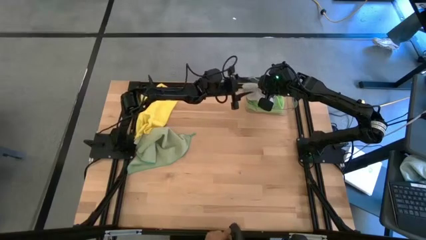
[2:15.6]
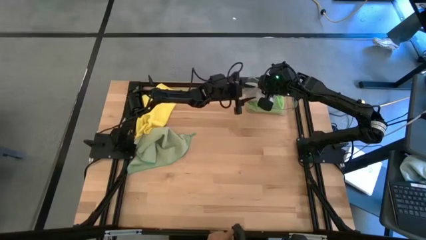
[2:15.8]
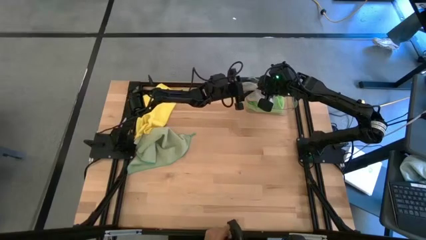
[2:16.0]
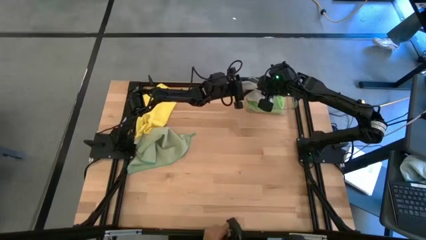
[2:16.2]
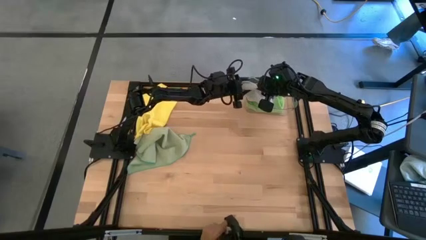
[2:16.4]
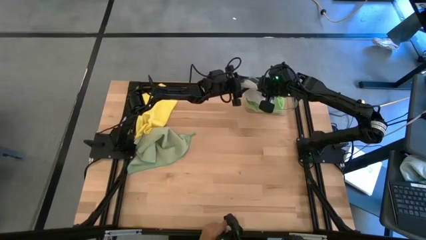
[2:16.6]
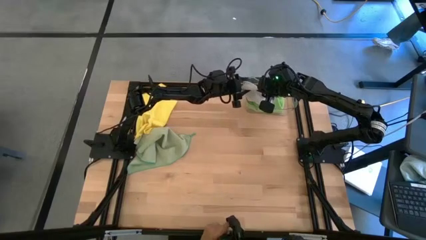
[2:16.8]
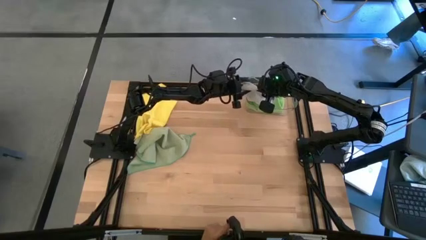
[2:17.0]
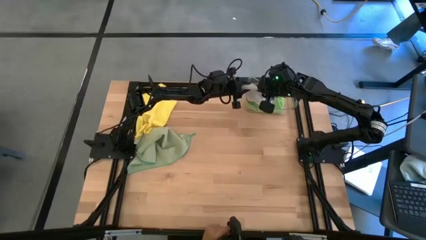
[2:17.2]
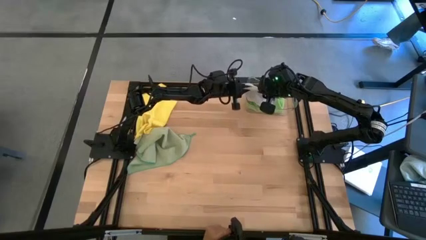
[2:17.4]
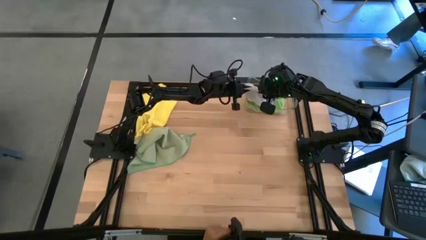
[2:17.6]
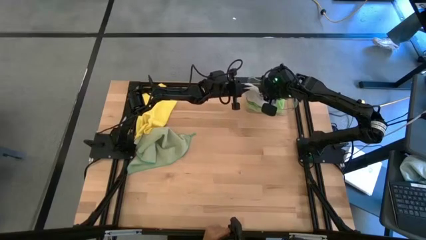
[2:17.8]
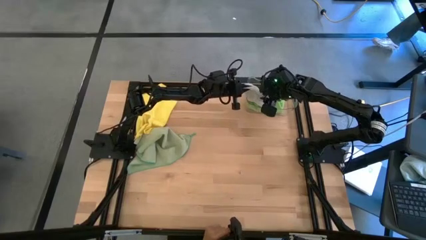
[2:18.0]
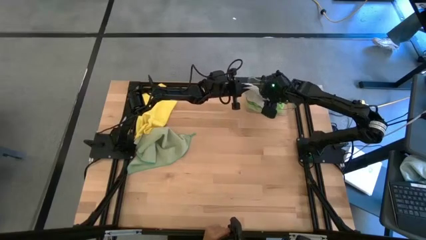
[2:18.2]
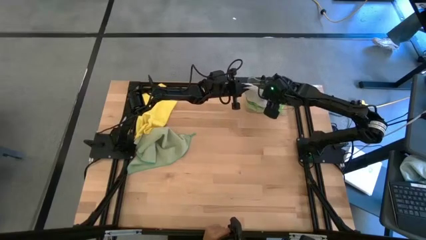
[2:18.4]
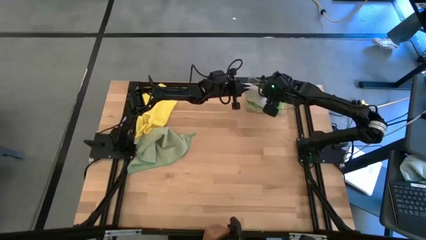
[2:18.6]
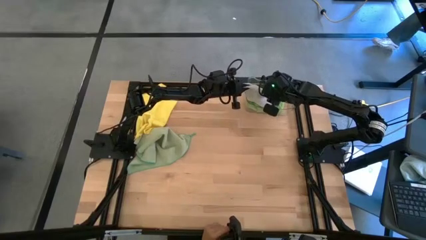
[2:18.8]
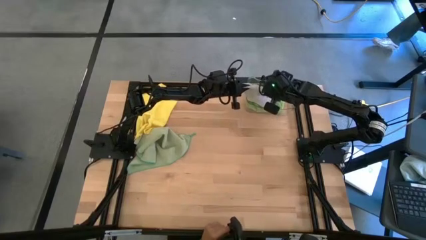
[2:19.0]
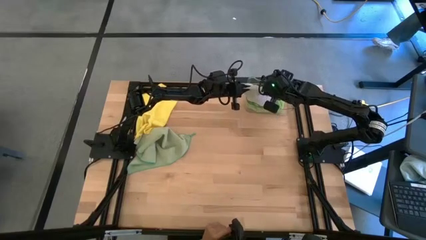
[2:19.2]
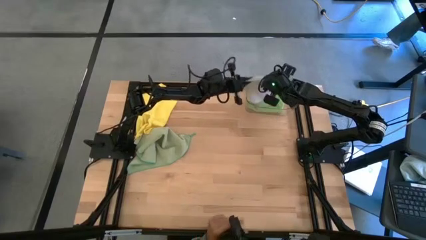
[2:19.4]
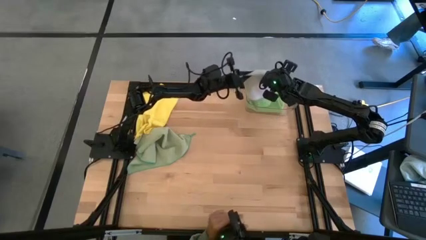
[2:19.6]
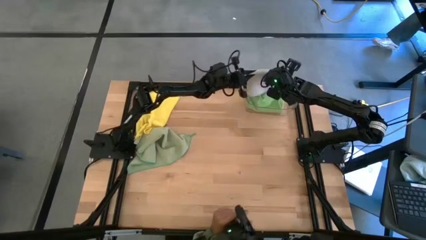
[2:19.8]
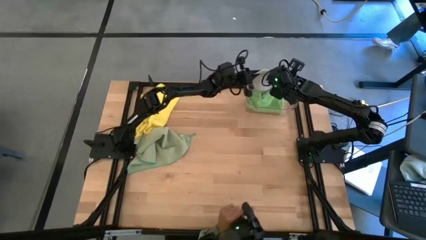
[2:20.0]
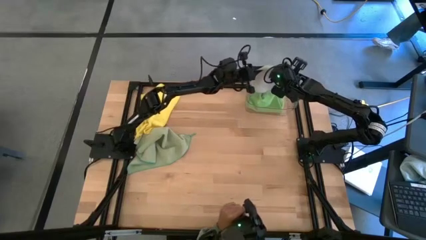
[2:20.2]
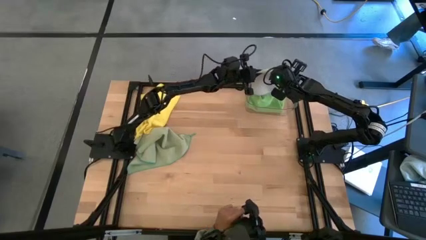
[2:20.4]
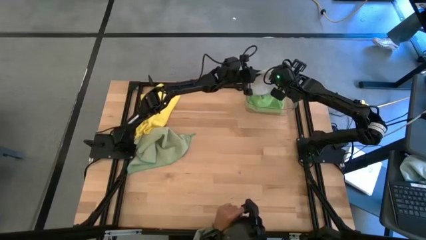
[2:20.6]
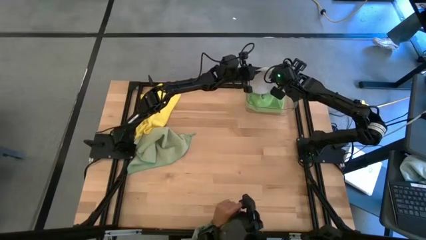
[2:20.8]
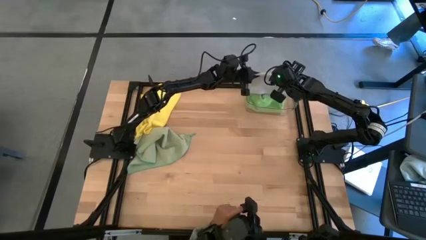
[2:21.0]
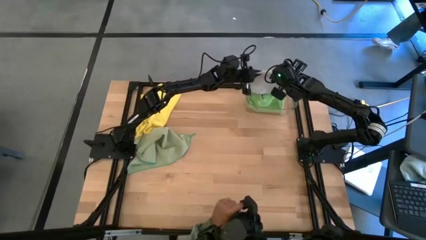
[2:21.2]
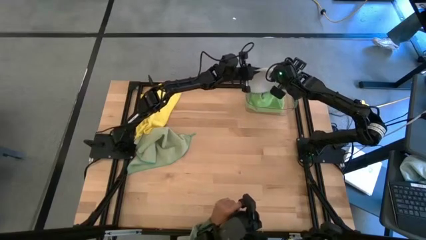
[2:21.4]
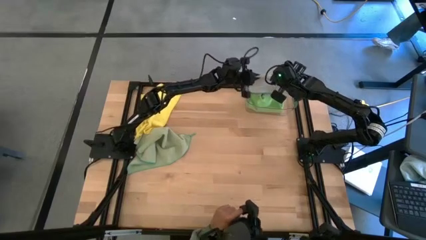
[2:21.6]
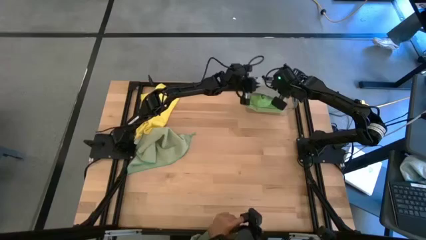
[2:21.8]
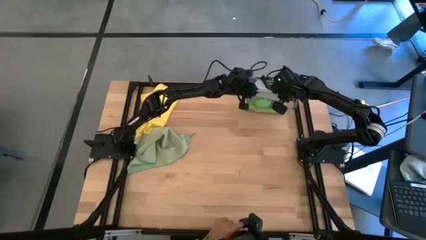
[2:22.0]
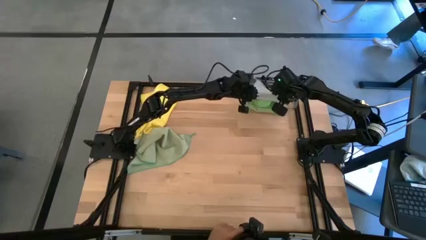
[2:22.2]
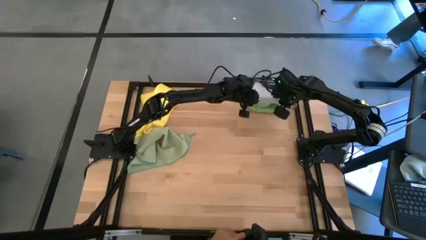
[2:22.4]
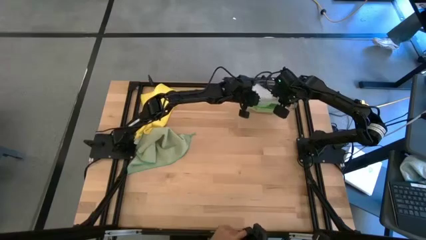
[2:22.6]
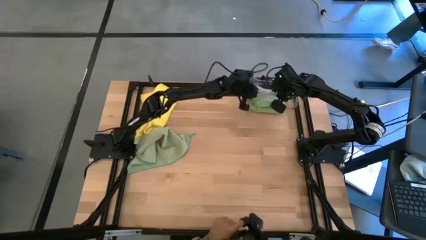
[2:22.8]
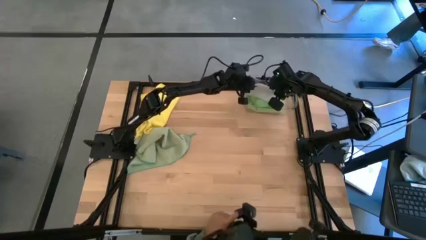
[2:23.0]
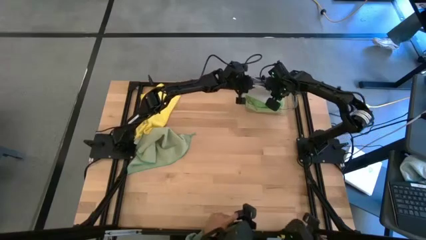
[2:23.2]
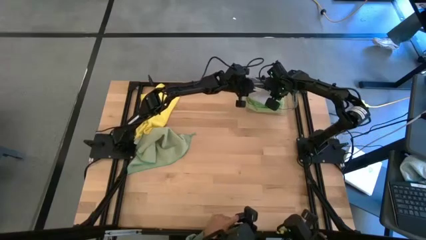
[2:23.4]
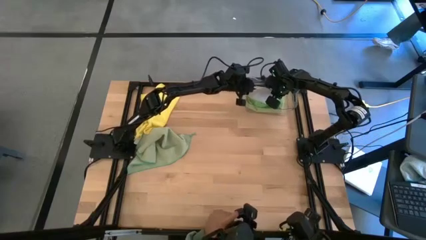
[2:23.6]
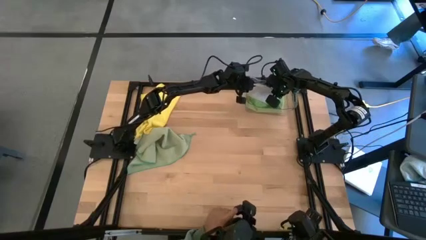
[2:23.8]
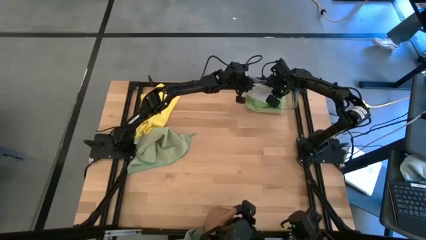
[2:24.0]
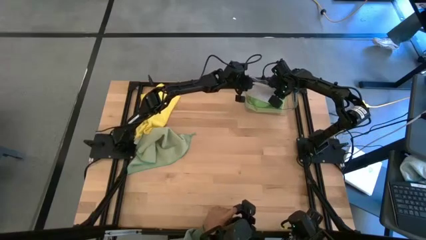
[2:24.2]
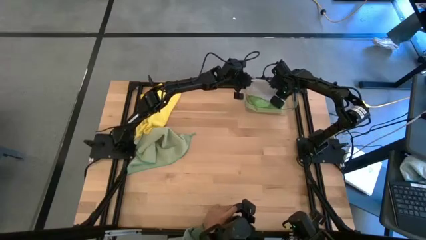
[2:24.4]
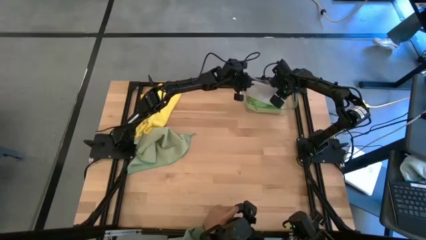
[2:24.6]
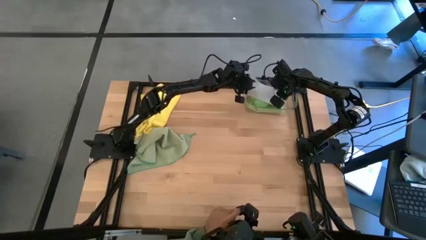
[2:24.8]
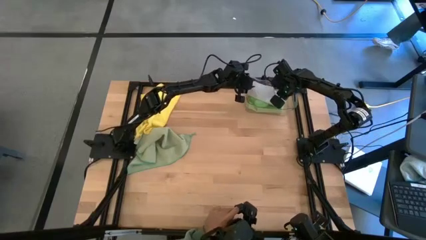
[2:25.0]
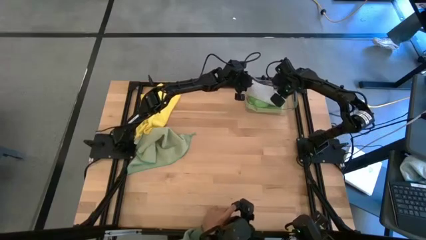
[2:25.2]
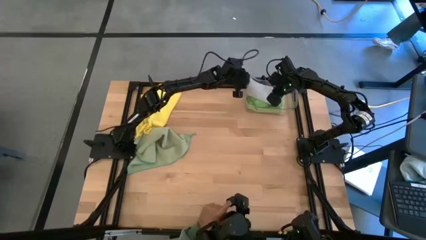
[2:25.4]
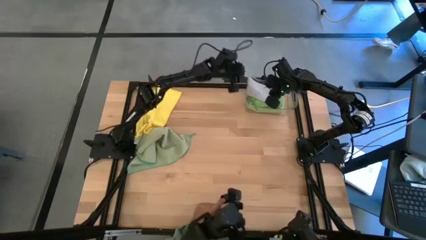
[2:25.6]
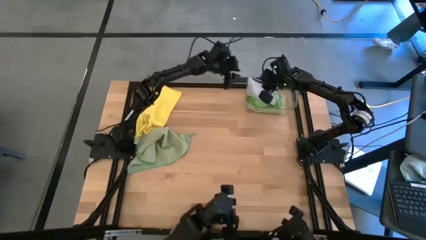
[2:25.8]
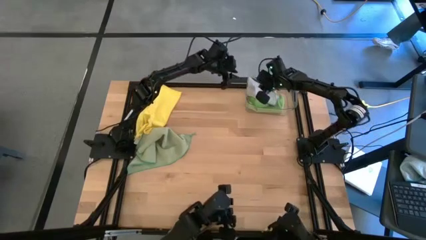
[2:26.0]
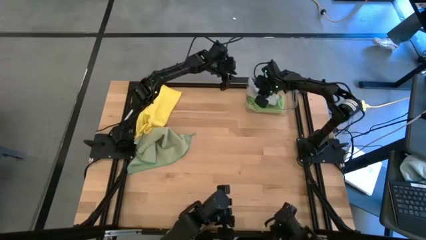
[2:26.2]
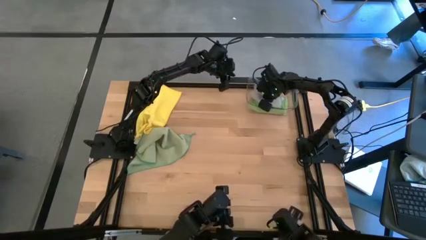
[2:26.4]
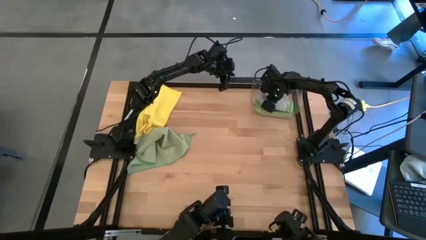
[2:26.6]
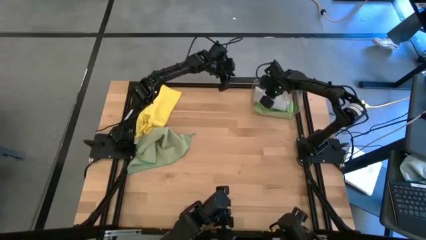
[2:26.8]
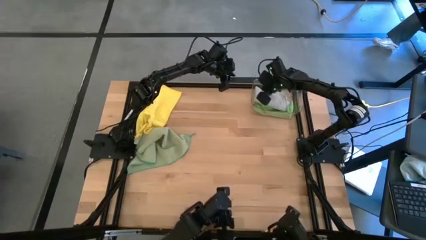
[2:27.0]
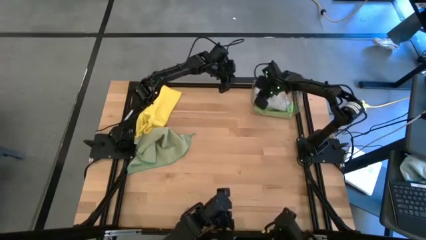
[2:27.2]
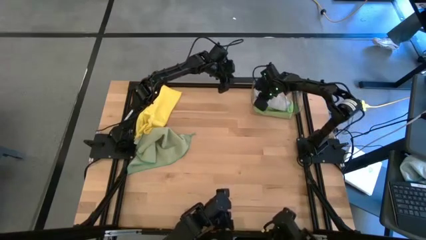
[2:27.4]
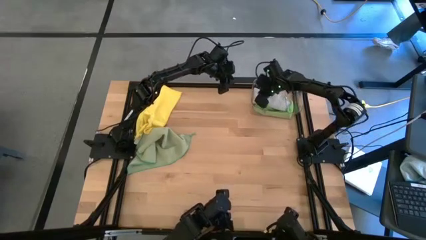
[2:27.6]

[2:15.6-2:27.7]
Task: Fold microfiber towels
Put the gray cloth into the transparent bin

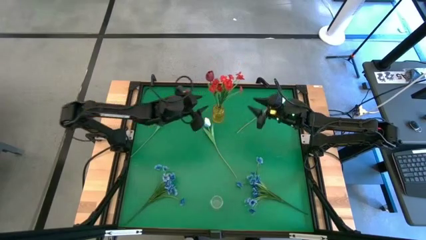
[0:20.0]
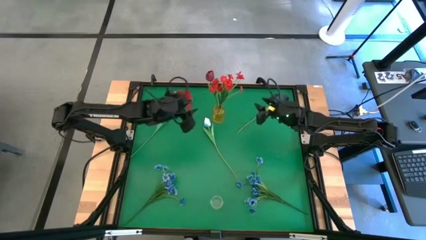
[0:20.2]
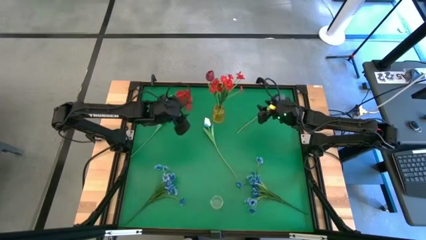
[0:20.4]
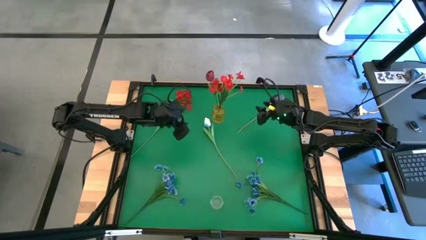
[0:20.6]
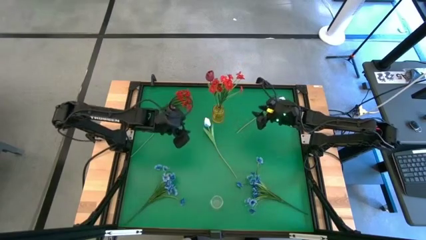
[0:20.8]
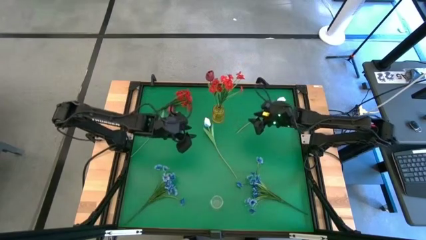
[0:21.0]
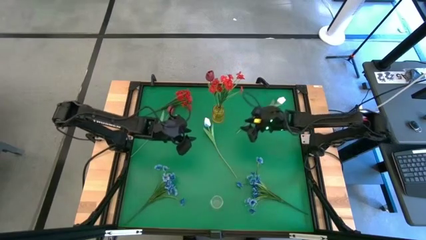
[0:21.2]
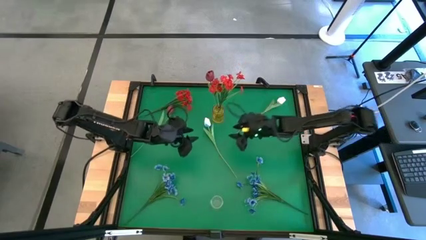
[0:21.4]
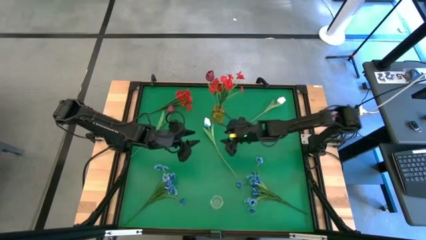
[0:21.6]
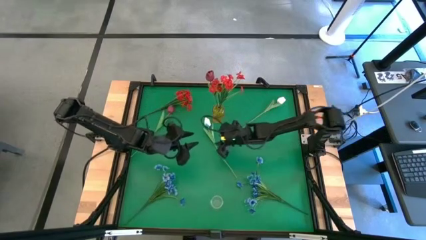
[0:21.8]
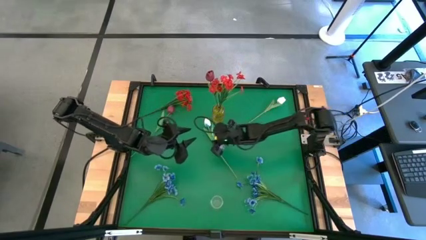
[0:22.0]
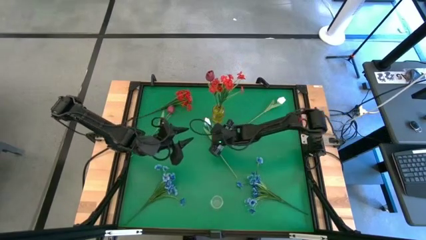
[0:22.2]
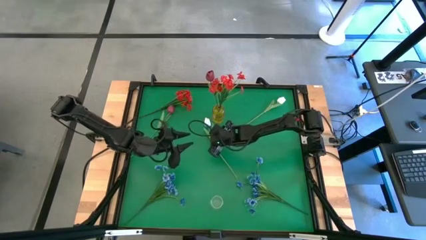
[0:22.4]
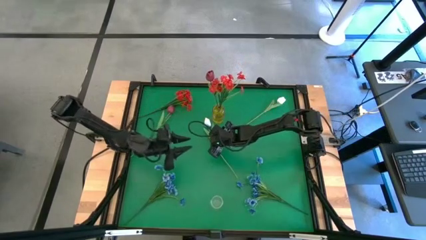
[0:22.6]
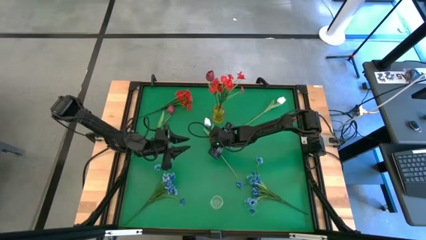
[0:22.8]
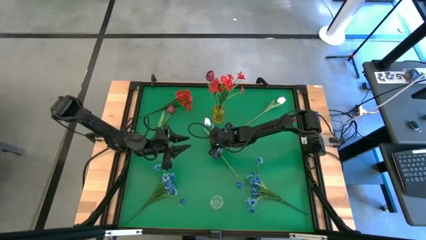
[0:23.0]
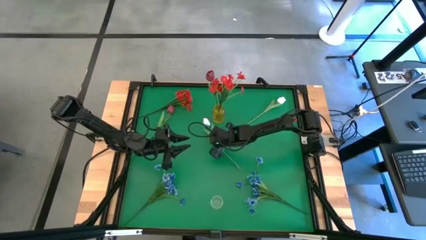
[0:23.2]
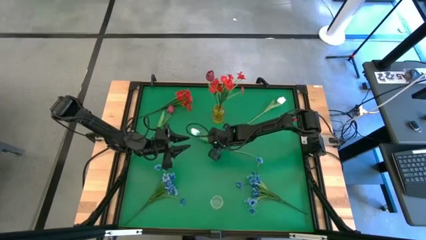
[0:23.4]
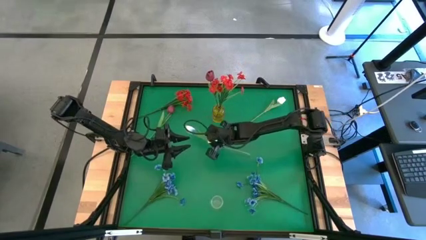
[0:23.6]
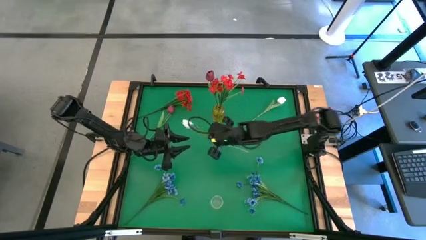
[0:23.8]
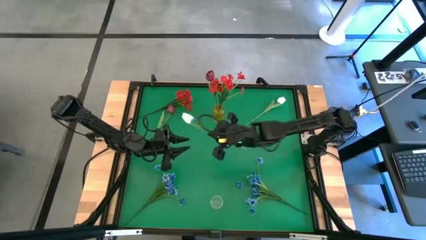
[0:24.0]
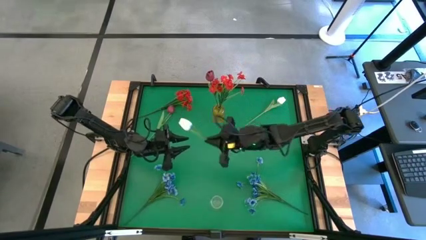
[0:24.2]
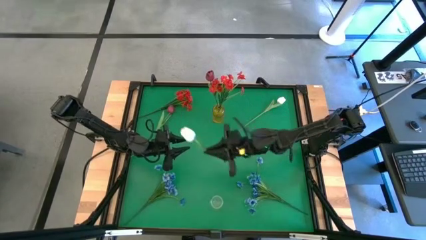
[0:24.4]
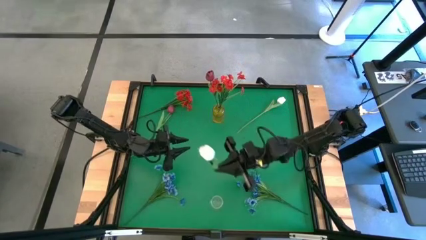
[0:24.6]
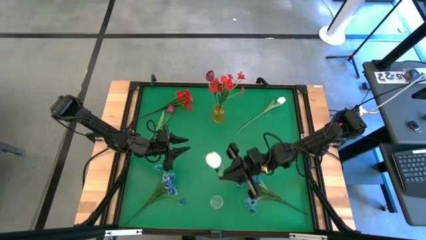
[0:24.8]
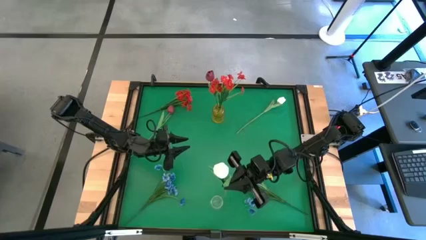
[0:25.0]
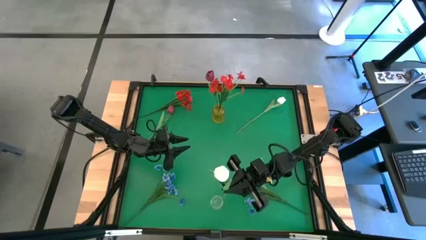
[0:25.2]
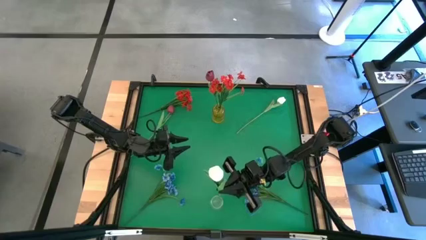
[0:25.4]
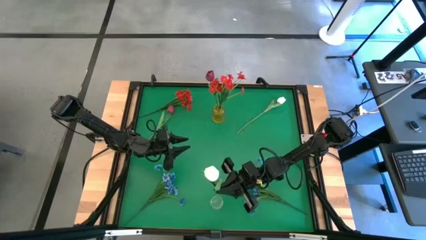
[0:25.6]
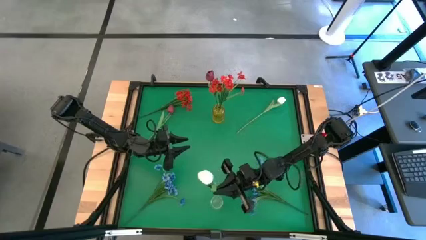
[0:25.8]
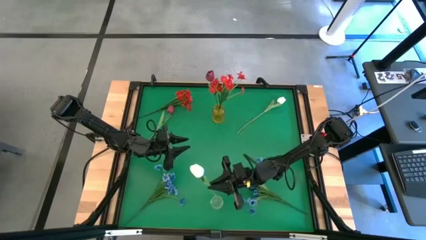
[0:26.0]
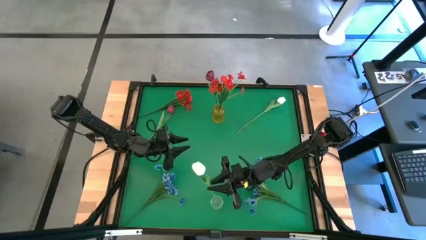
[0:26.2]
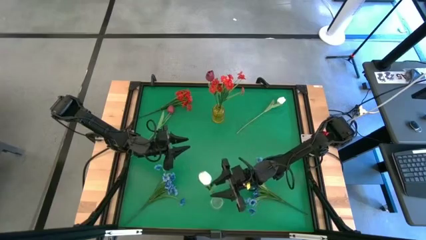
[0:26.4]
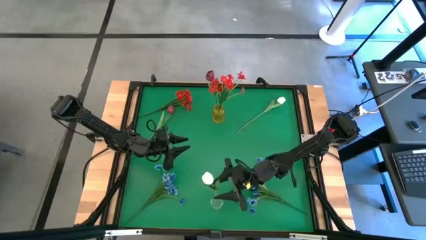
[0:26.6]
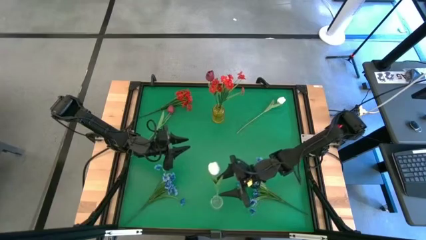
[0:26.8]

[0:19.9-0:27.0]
Task: Sort flowers into vase by color
Put the bottom white tulip into the transparent vase
